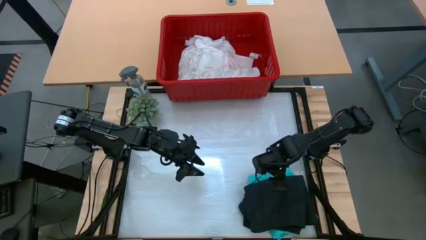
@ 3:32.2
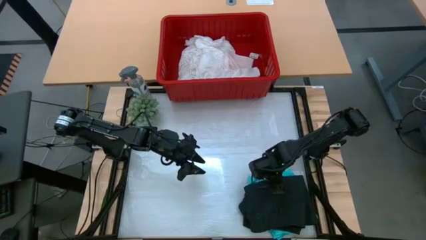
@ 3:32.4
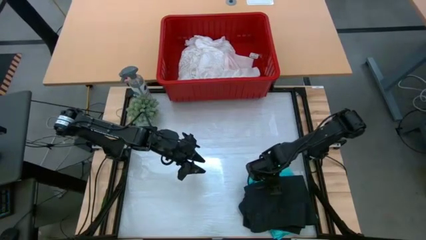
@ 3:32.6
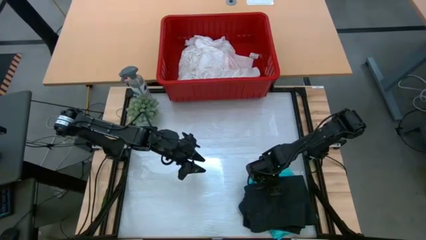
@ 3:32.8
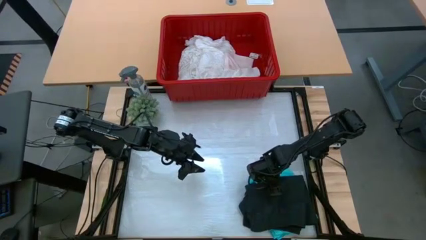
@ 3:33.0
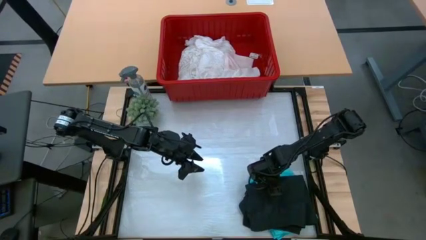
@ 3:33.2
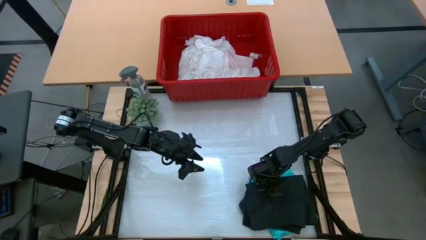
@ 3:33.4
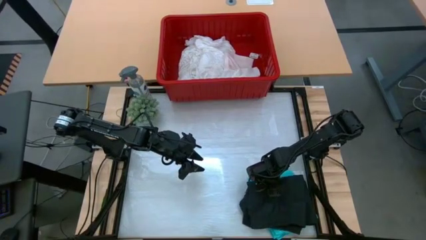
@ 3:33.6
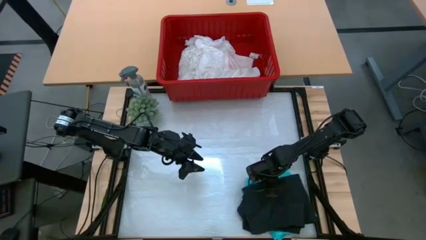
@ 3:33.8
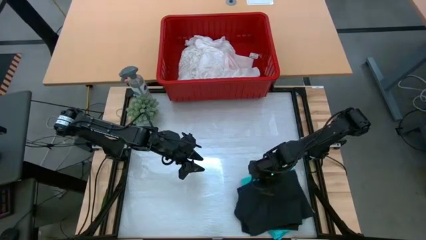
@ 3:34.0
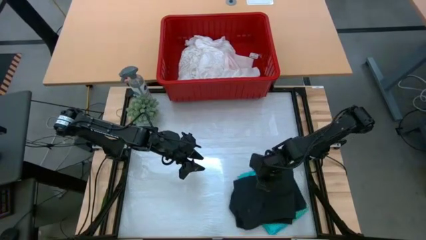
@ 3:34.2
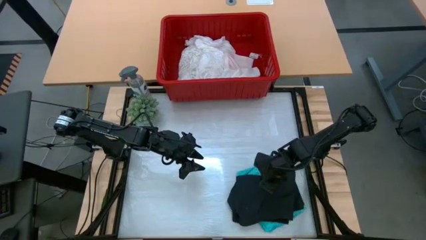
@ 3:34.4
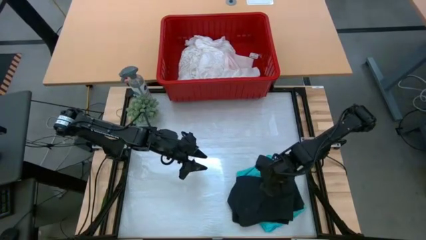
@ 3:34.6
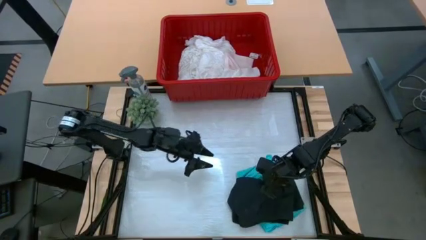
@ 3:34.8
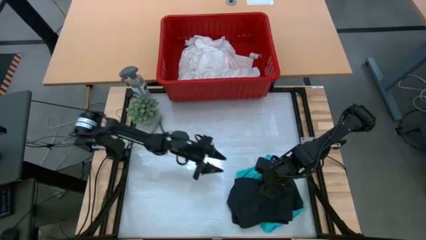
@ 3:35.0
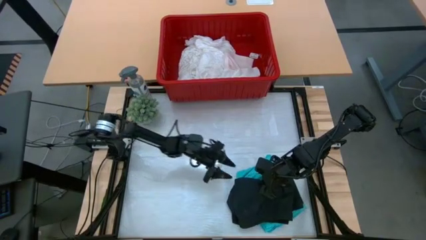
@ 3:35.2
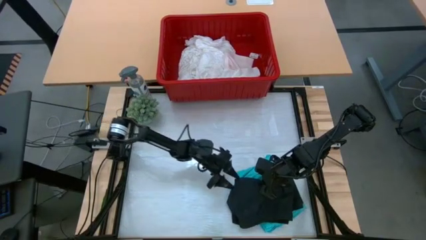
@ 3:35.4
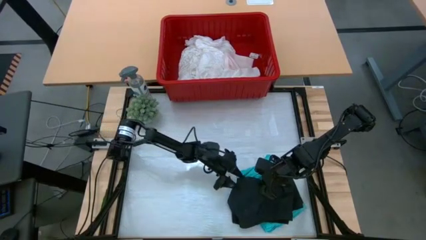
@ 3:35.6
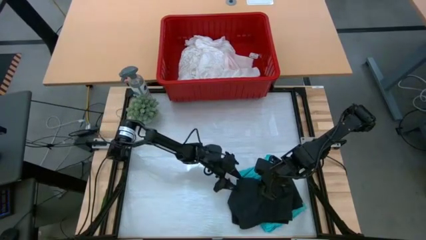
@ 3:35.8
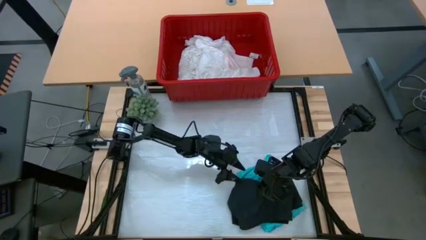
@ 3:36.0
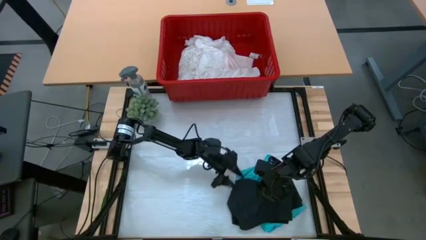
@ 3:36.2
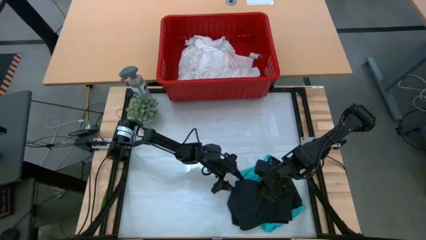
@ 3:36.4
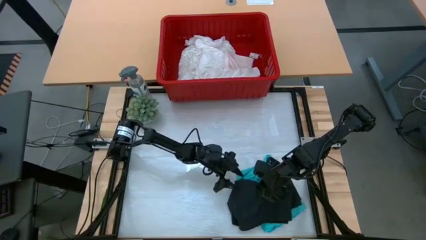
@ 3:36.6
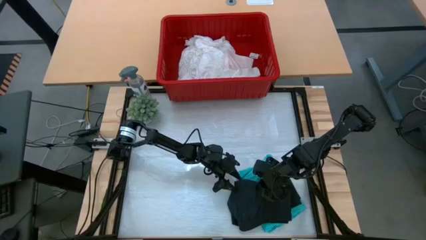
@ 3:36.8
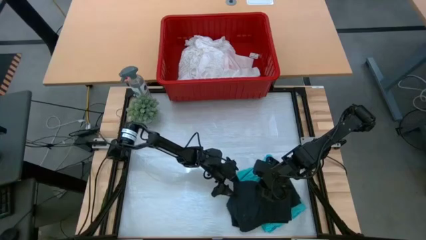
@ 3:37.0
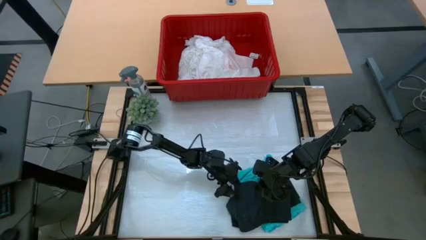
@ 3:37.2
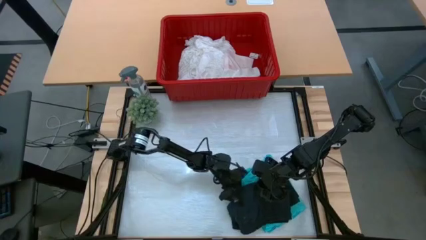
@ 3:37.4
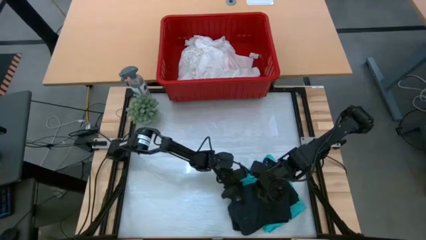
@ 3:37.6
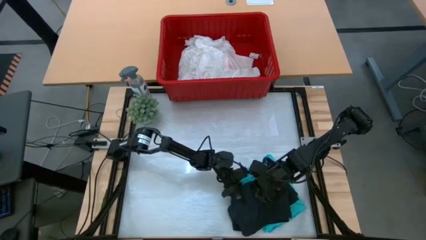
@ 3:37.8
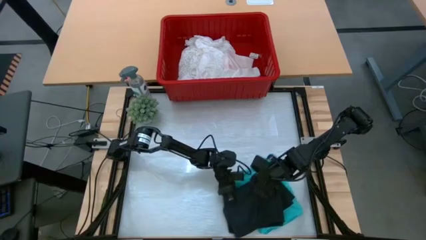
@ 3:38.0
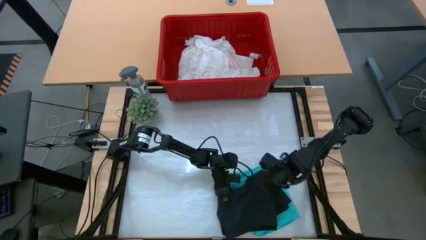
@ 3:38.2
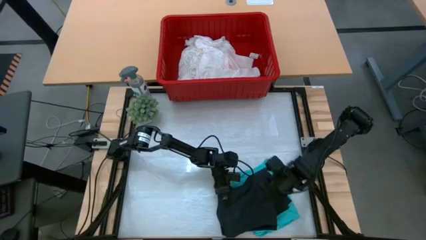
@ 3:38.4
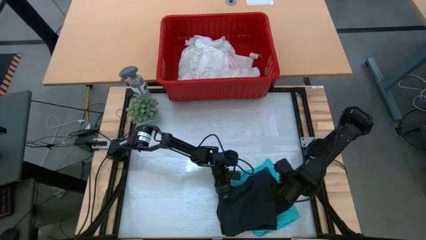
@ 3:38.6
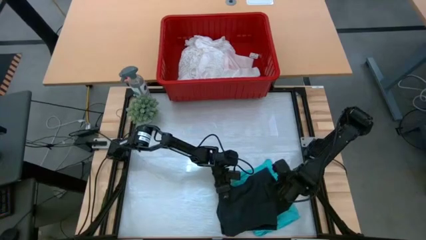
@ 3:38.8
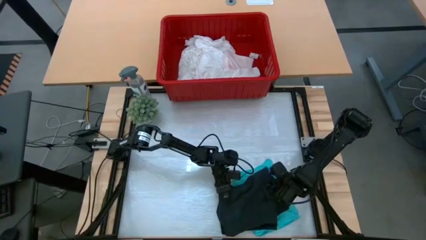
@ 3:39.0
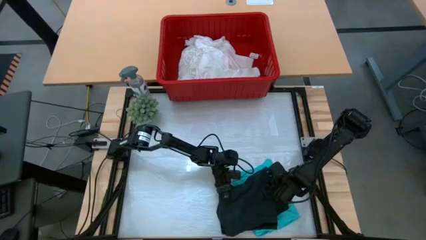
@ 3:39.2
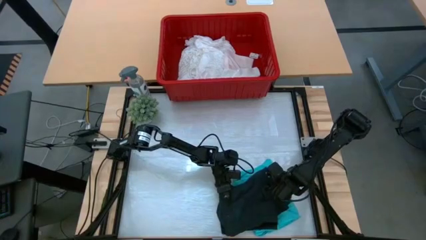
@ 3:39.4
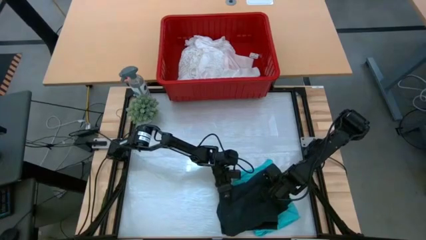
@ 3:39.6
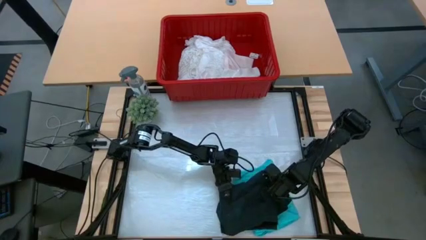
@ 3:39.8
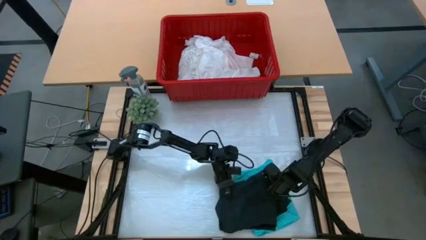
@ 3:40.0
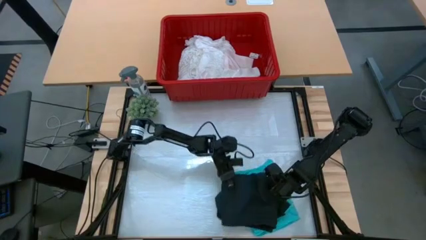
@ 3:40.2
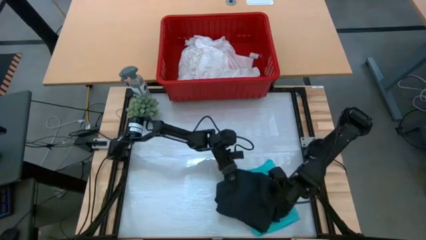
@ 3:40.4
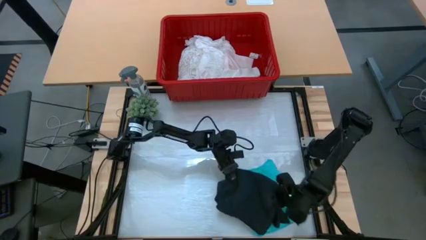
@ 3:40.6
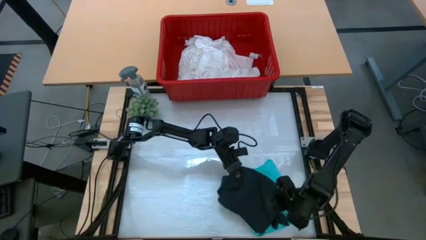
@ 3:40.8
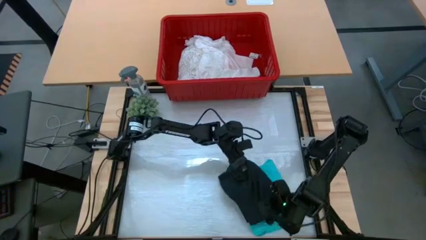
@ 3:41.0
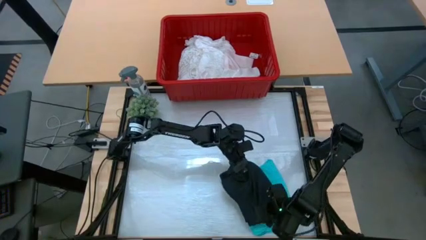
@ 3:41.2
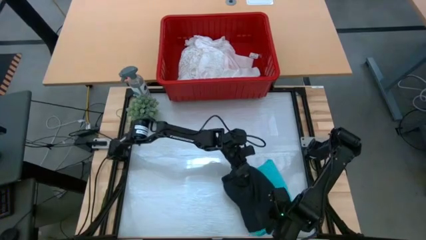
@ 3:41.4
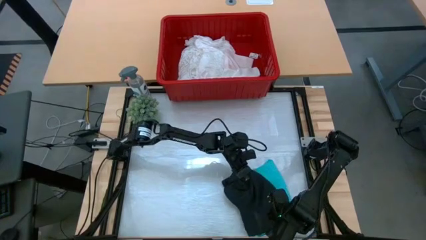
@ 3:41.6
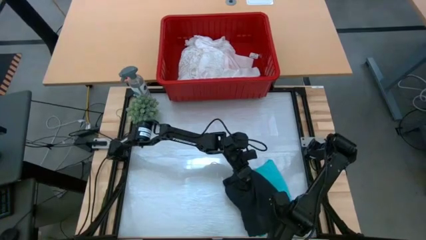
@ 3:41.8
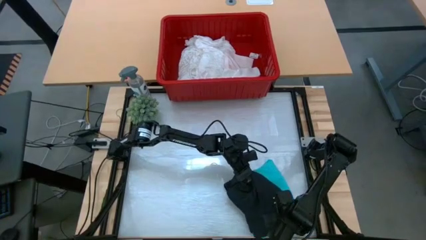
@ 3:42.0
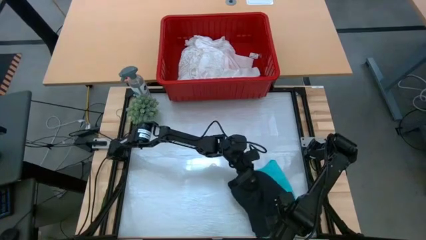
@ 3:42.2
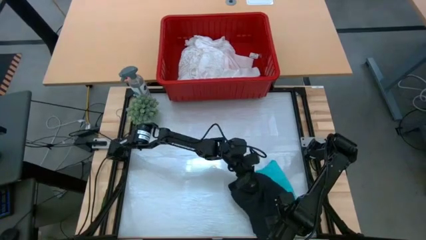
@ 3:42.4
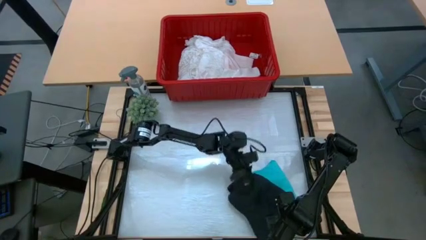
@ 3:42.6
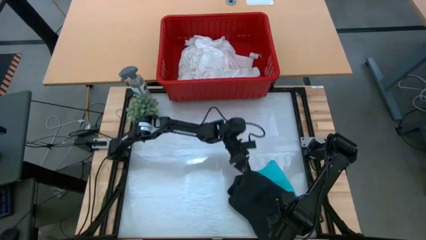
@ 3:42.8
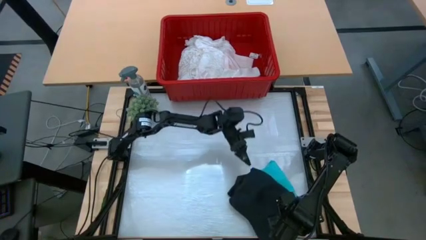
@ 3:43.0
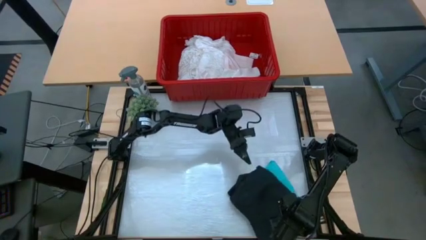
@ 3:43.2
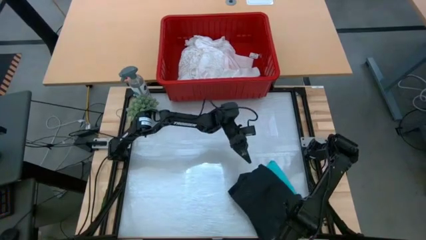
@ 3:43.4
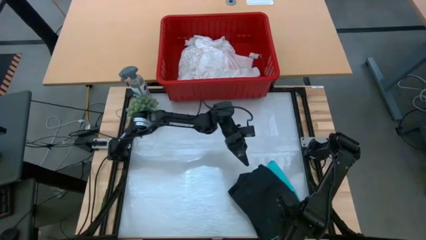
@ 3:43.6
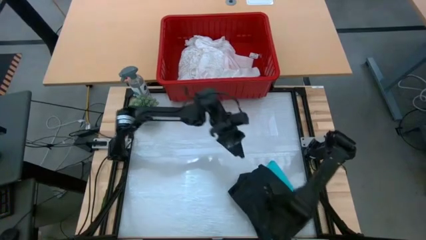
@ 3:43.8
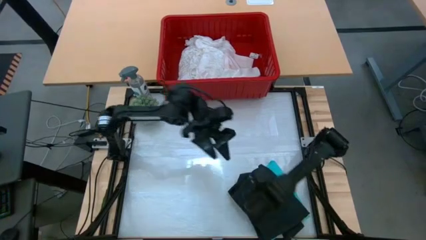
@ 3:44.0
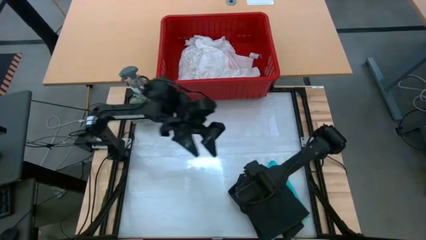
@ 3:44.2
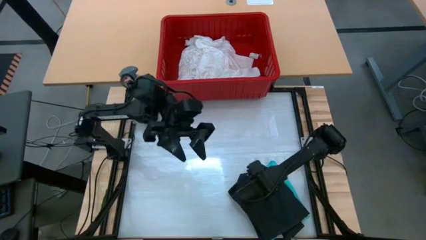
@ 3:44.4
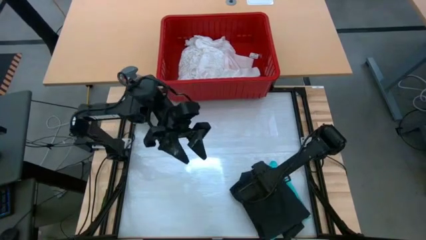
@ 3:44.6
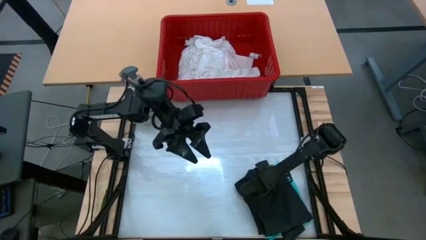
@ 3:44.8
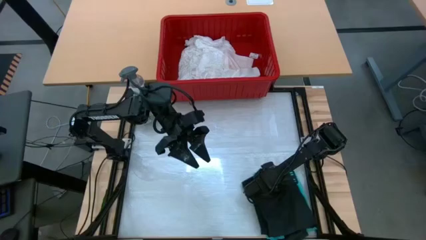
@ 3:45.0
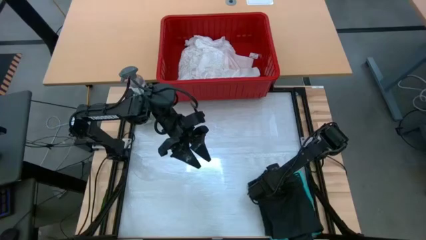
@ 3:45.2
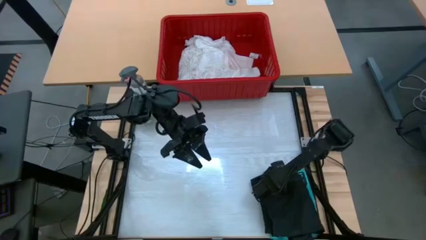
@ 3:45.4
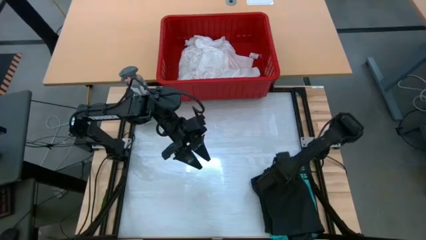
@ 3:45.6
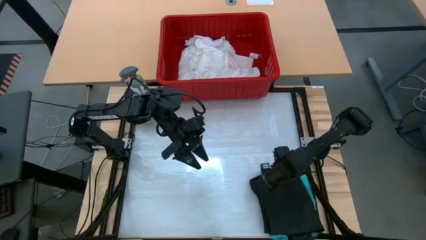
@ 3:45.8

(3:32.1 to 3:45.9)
Task: Fold Laundry from Bin
Stack the black shorts on top of the blue shorts

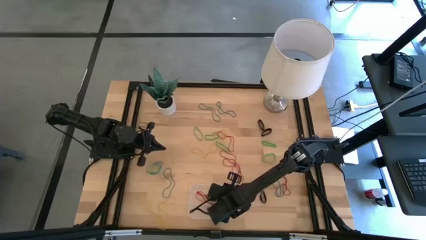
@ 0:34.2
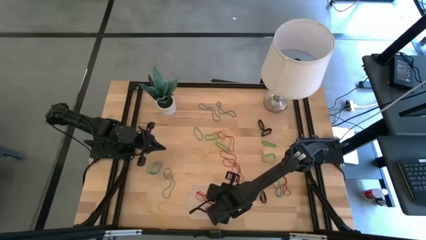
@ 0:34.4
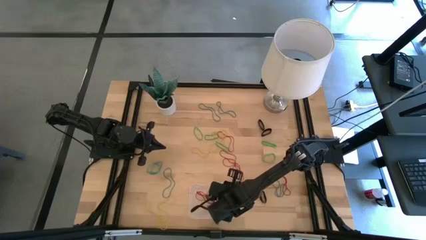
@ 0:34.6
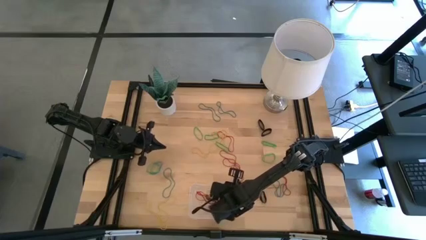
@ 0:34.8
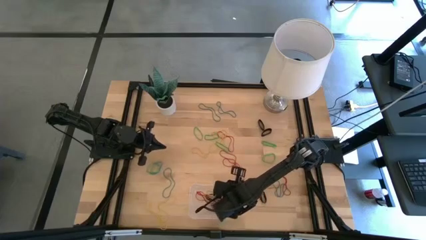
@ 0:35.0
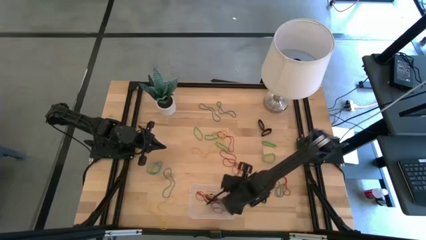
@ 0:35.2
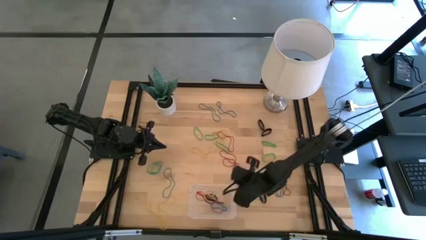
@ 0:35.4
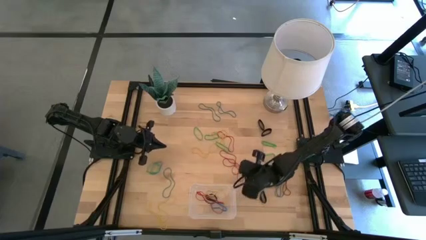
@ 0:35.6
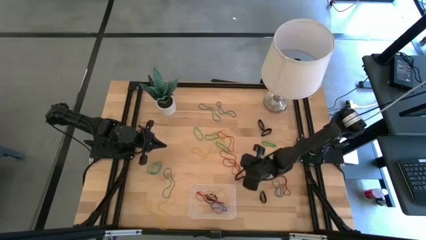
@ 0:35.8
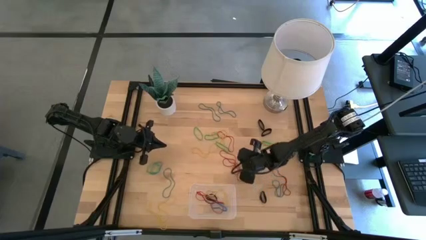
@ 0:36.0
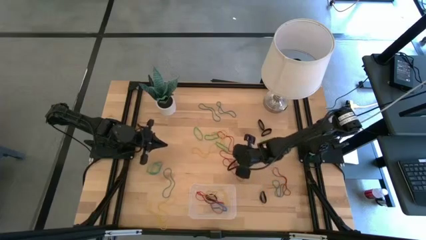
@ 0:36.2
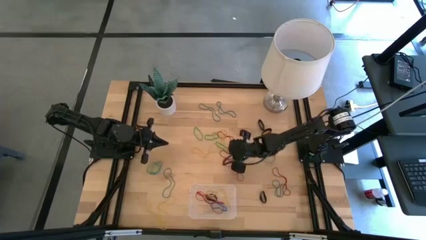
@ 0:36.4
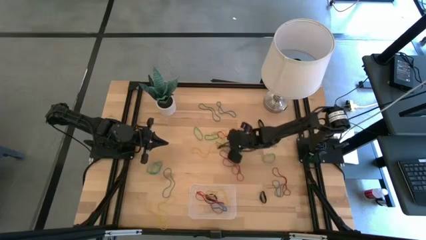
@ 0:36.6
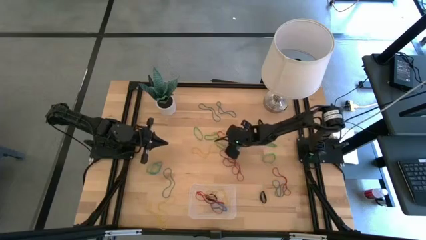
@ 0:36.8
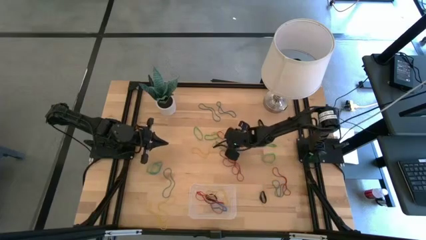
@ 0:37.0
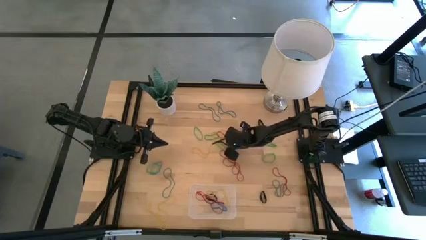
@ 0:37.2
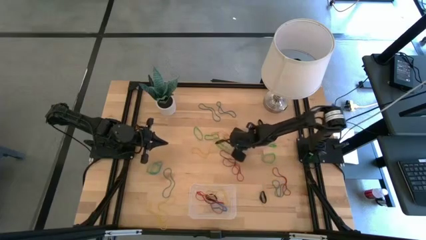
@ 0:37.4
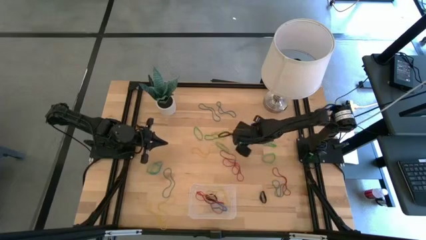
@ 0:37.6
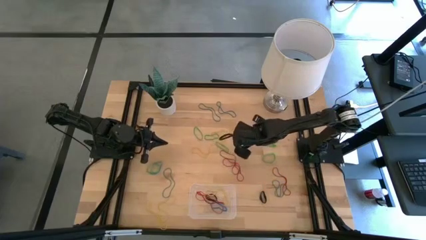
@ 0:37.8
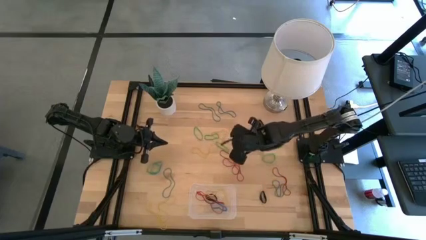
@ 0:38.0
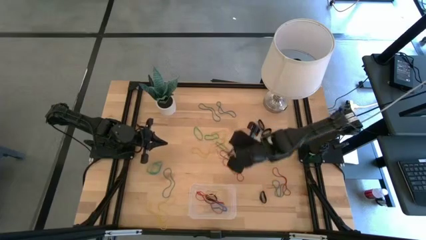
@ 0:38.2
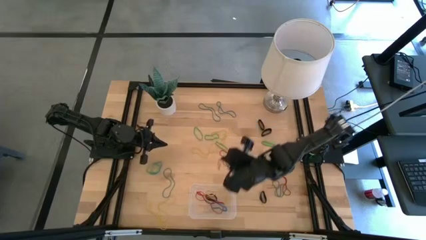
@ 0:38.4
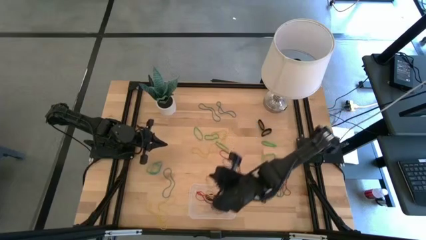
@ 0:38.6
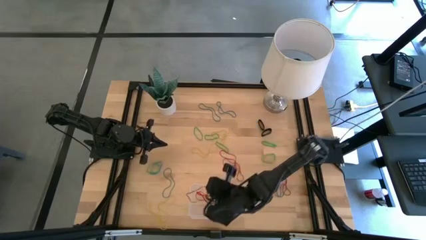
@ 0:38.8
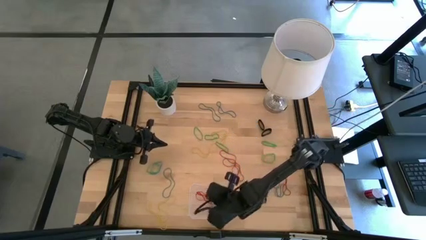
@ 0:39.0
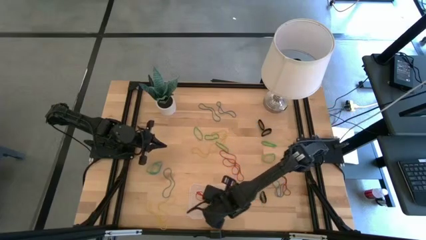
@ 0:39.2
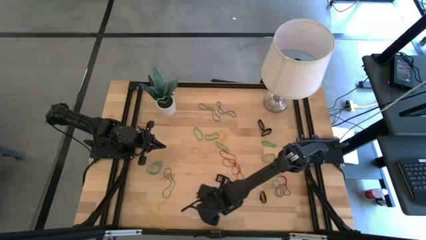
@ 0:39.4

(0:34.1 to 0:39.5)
Task: Pick and place rubber bands into bin
Put the red rubber band into the transparent bin
